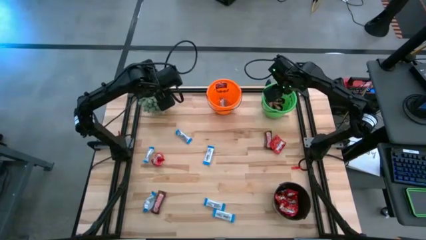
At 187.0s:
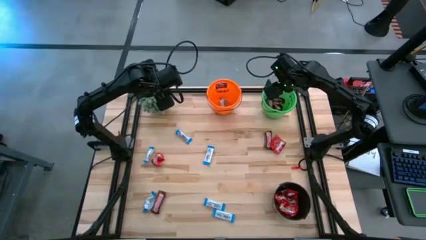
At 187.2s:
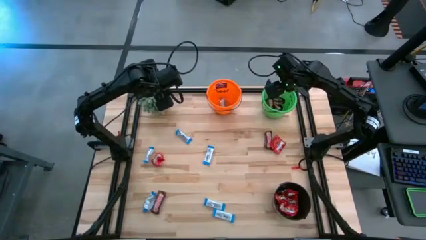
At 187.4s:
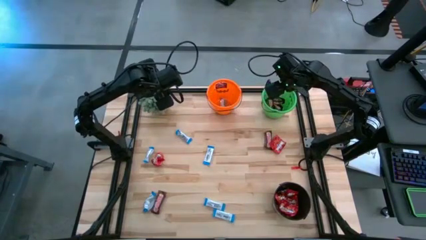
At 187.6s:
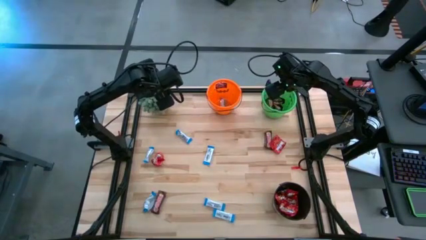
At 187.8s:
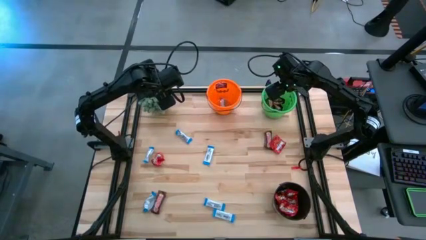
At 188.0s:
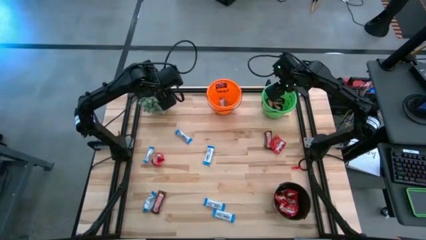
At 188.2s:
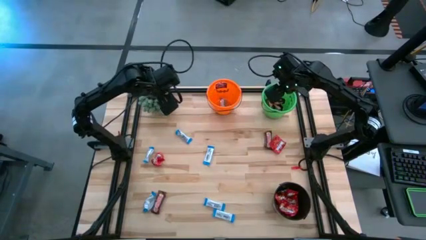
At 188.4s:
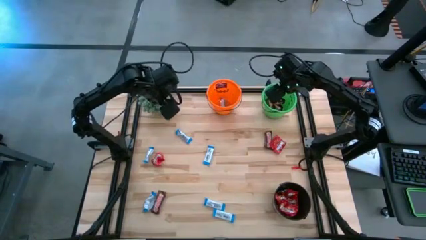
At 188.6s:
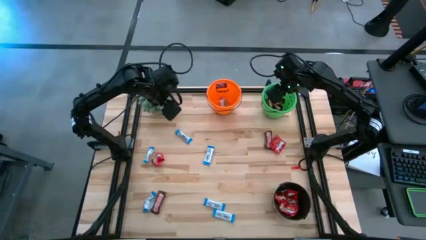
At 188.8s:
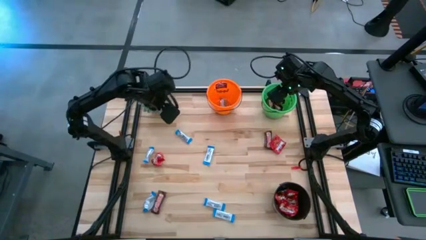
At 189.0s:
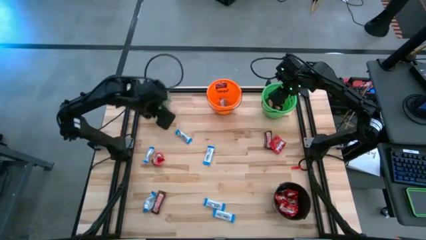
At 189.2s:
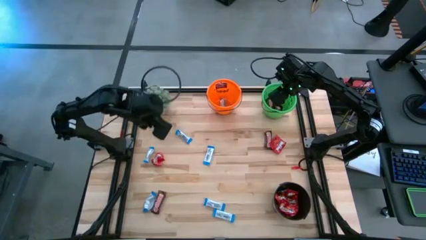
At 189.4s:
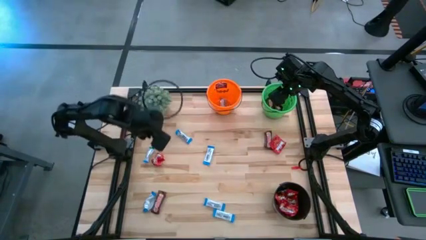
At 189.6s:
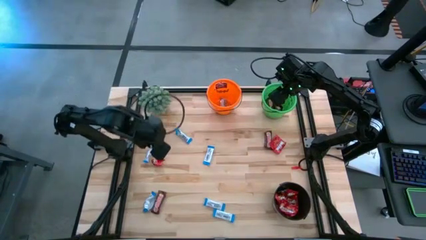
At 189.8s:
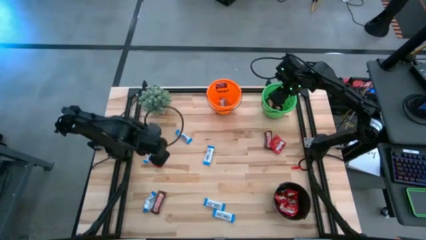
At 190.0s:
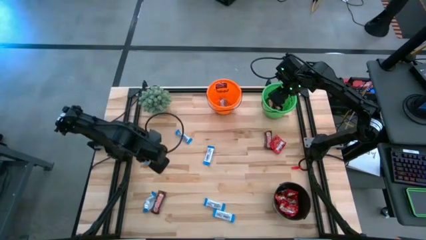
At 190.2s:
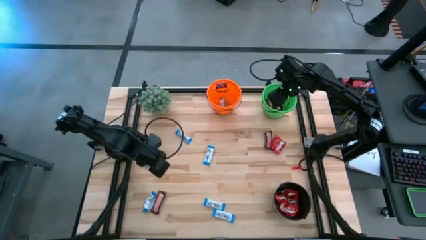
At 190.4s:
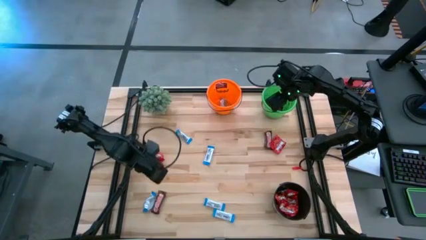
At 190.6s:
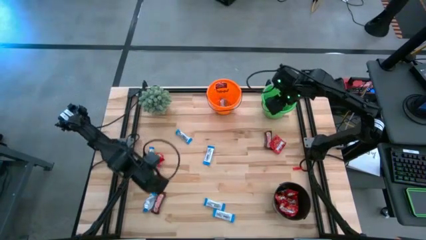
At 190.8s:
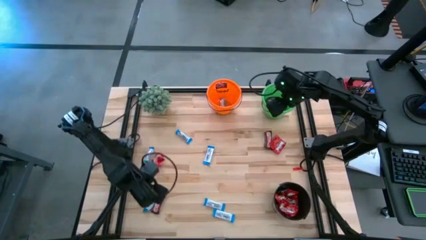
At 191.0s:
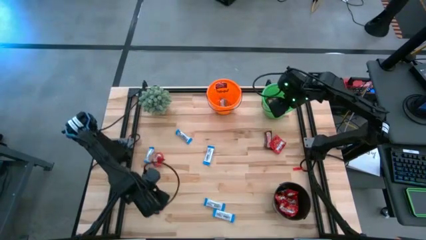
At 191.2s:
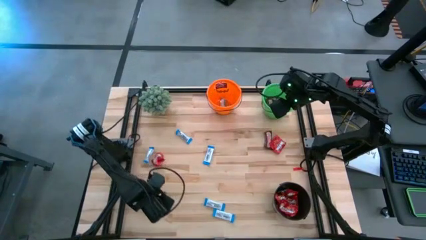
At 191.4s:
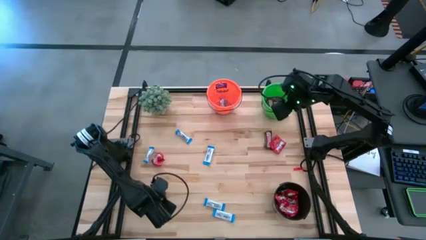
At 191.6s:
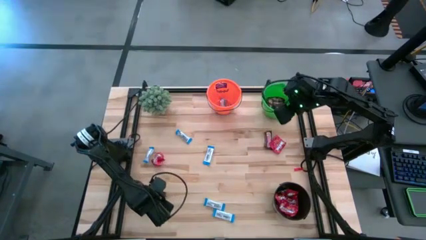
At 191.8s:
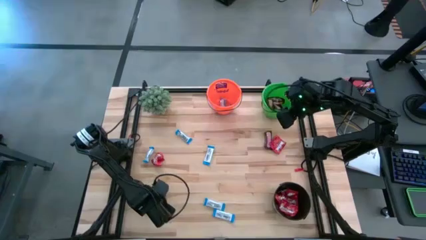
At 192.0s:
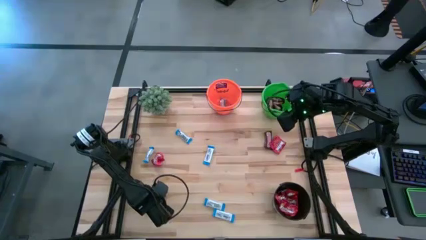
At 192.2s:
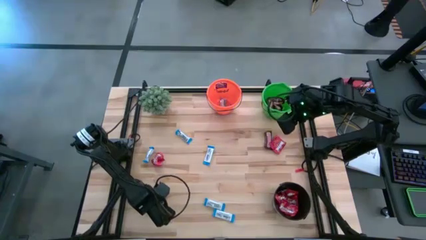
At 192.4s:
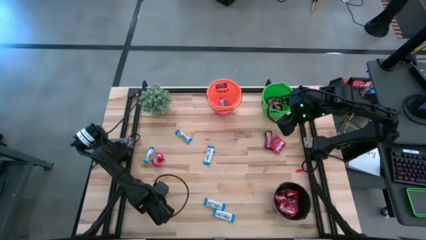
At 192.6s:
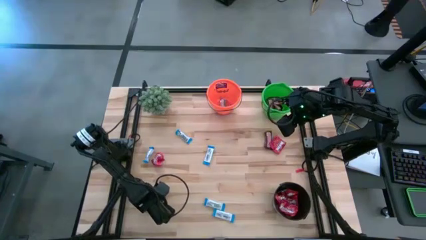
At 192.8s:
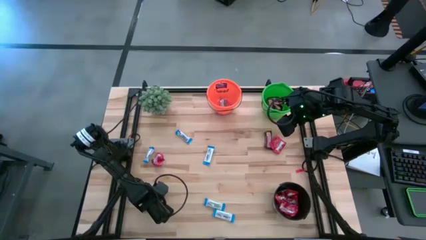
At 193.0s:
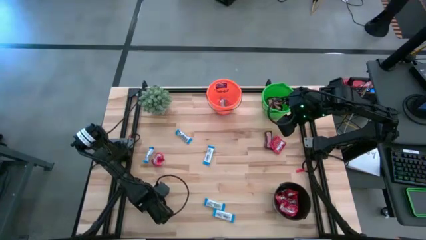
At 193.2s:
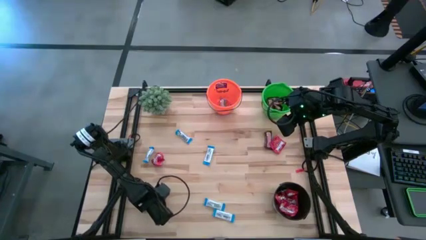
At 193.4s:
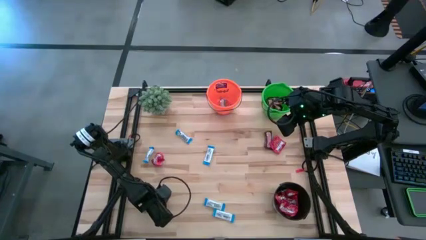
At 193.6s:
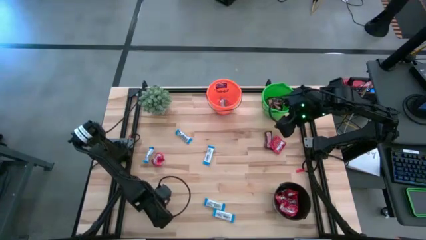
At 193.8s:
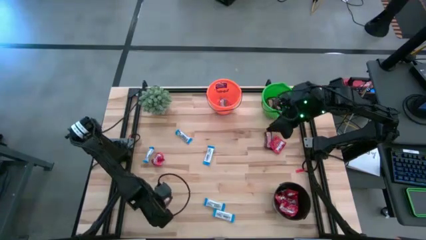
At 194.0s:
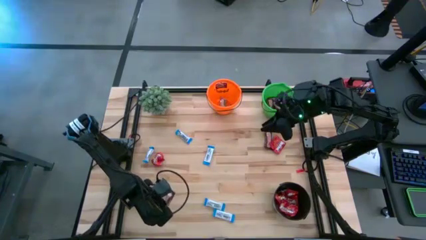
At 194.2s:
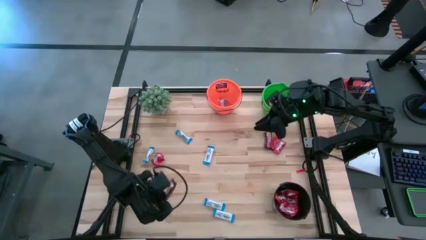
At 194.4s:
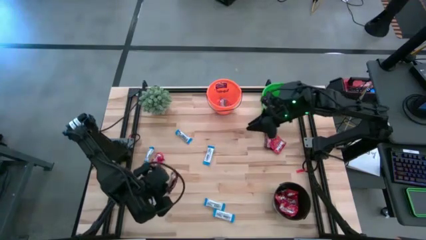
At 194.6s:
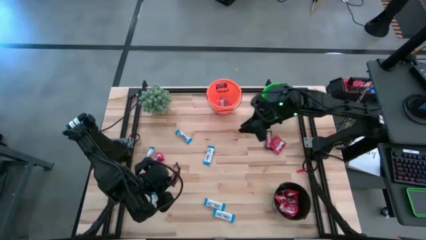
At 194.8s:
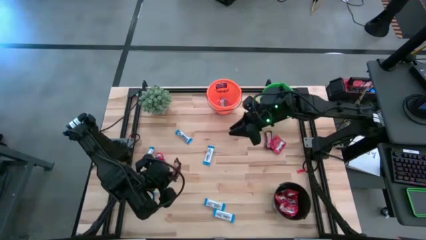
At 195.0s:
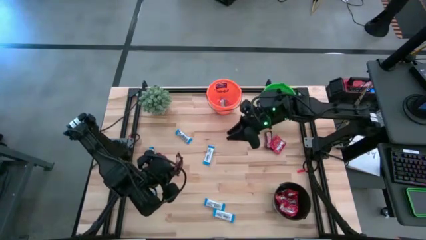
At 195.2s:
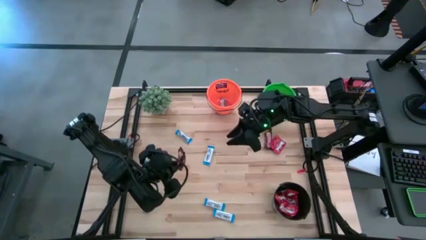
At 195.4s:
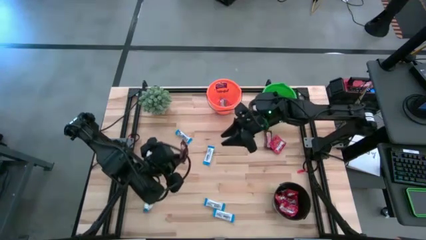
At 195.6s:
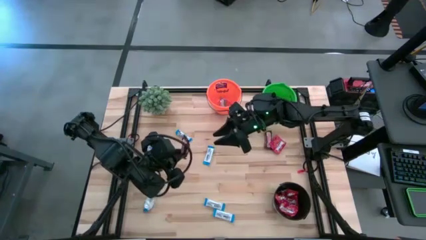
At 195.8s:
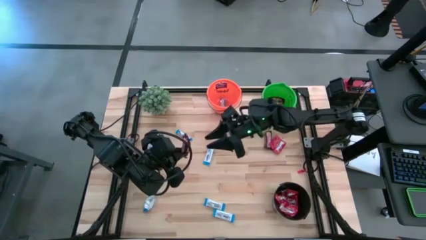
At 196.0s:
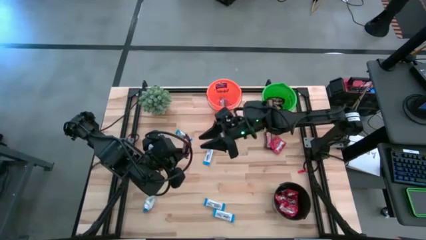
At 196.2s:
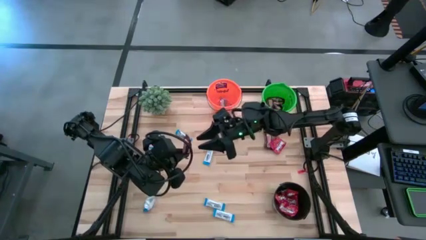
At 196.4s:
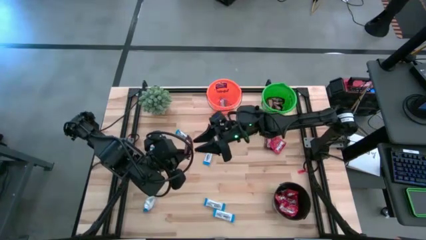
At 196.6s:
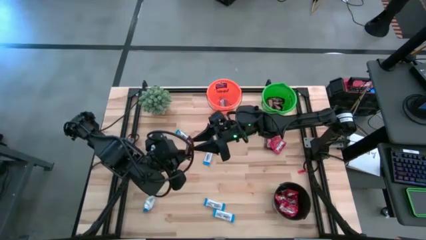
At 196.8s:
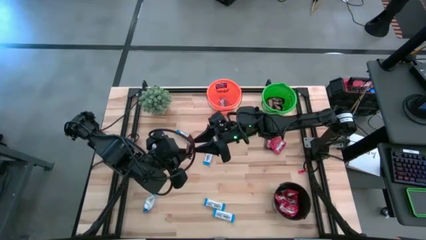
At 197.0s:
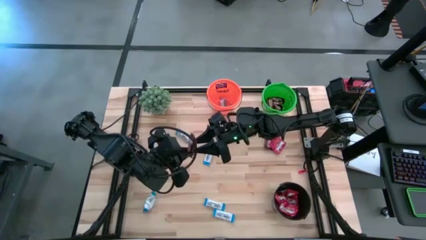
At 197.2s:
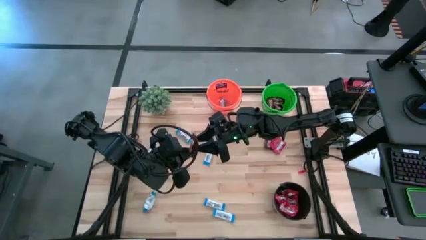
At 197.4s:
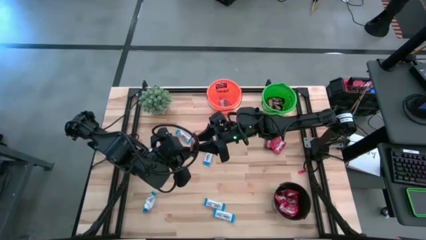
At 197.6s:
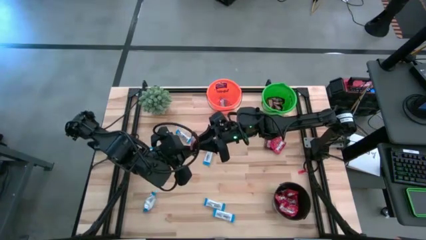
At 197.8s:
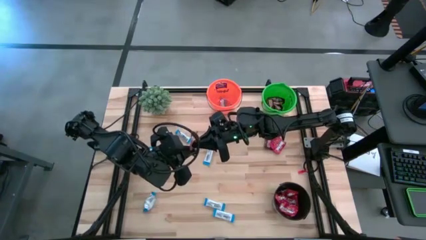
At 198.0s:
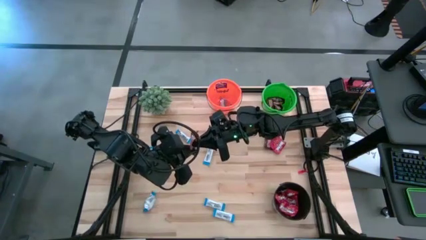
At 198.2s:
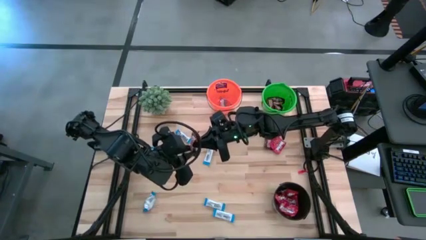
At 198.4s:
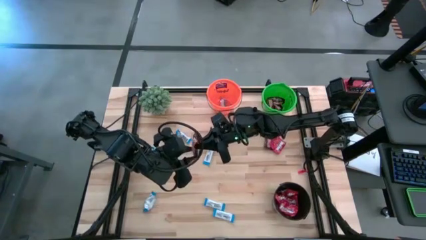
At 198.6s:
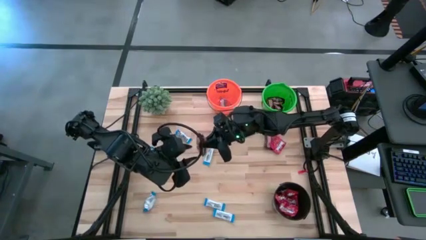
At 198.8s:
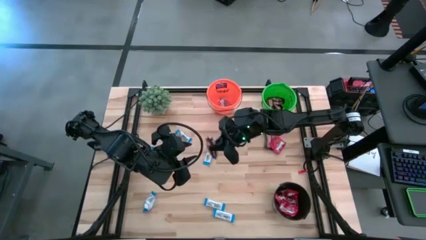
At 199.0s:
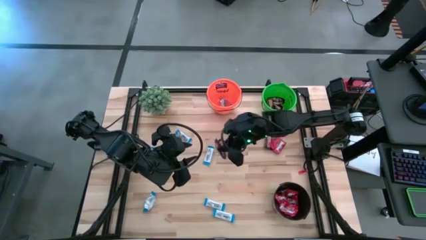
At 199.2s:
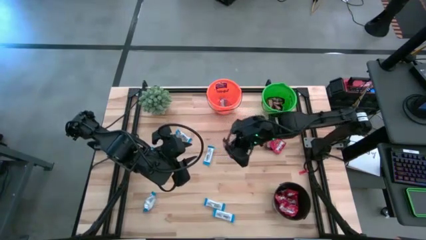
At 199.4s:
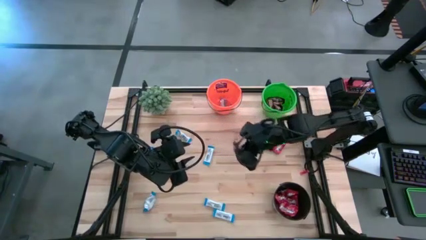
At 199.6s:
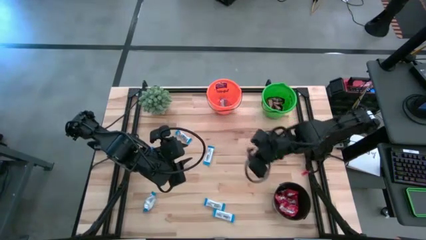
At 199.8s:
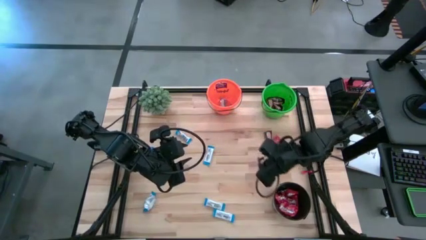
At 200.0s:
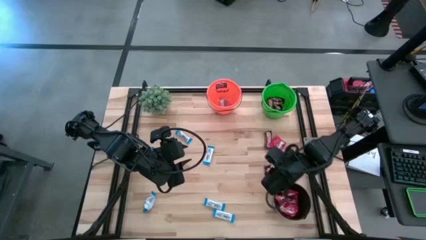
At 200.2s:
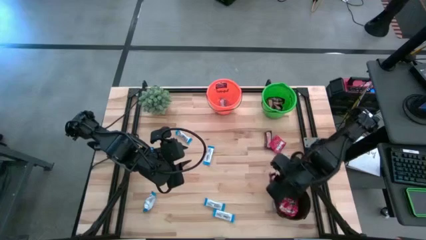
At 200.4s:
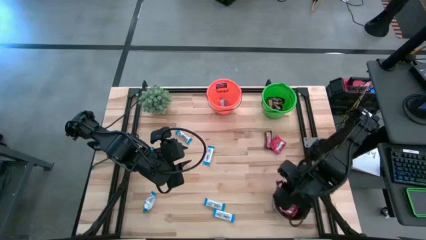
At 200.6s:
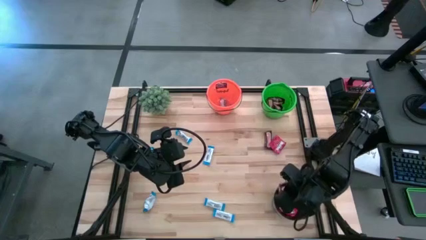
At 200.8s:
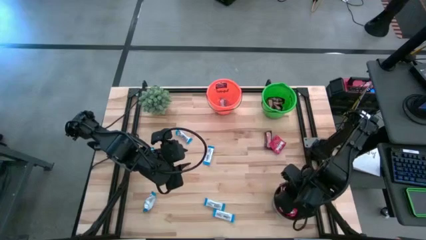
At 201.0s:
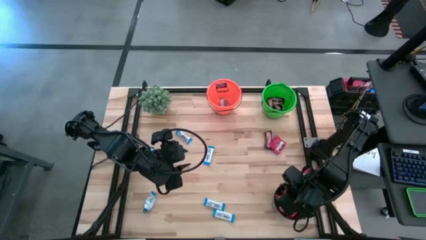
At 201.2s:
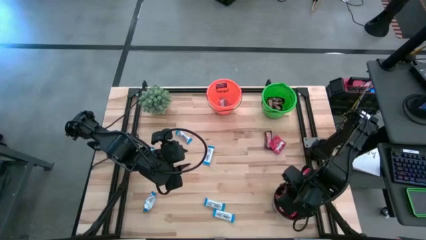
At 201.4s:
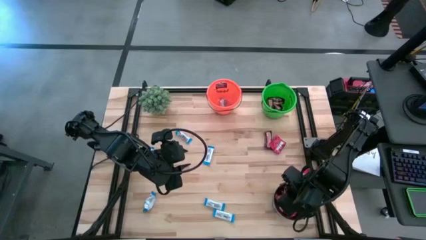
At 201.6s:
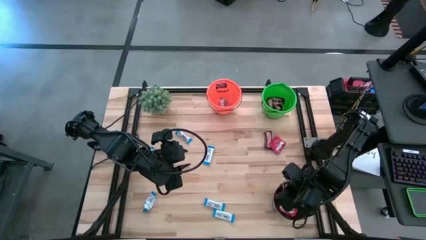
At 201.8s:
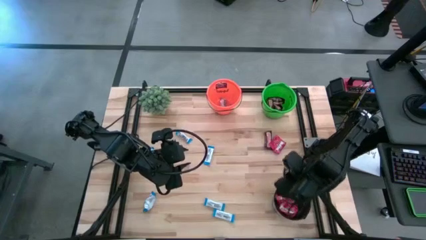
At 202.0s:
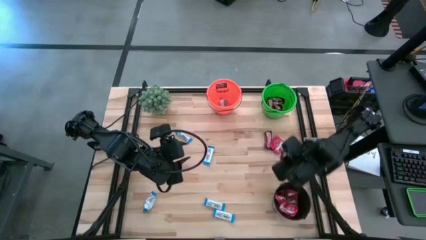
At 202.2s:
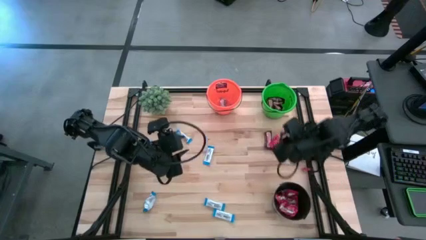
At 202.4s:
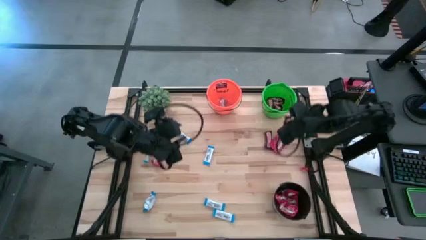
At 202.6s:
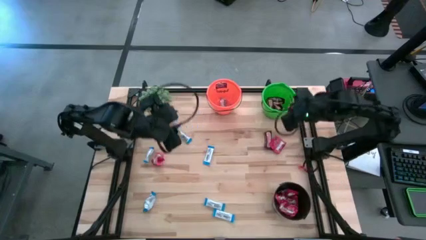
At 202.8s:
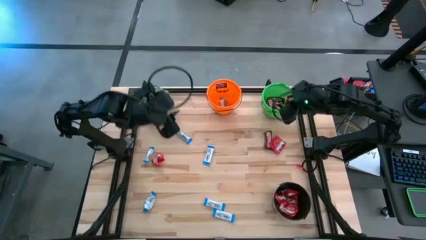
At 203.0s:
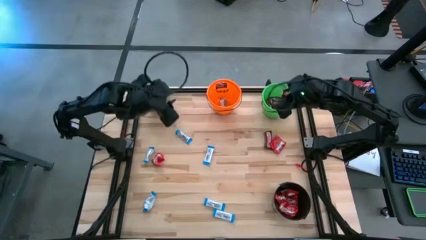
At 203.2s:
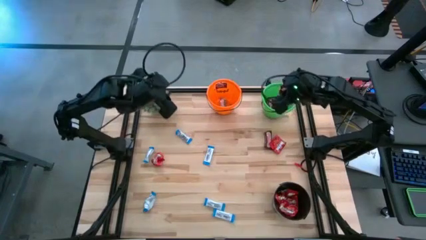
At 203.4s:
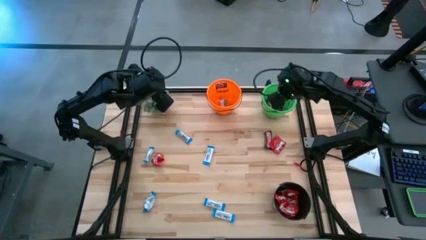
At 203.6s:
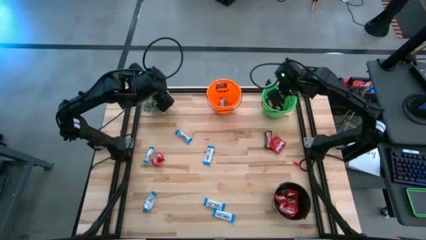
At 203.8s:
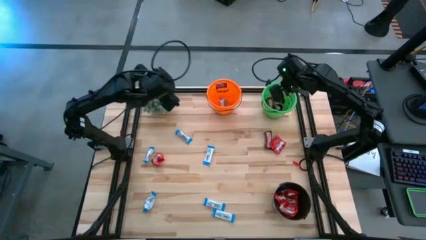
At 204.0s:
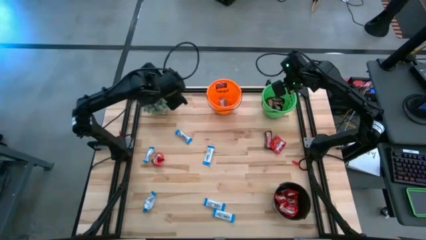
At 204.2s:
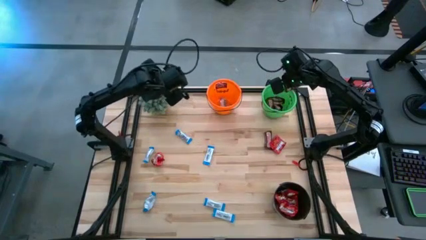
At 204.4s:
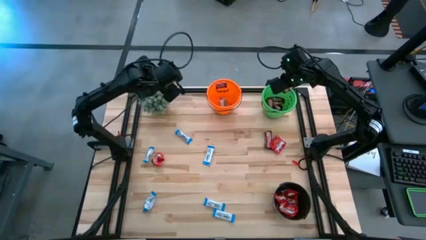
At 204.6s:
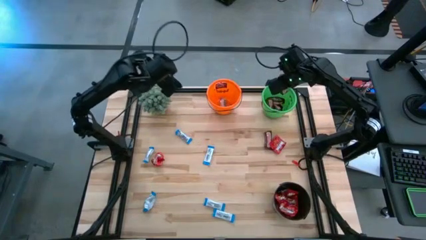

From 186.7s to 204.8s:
Task: Organize candy in baskets
Put the brown chocolate into the green bucket
